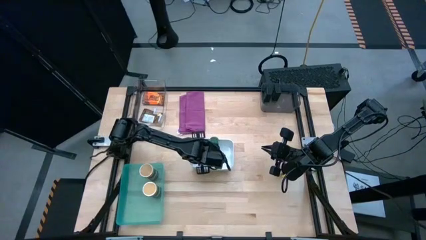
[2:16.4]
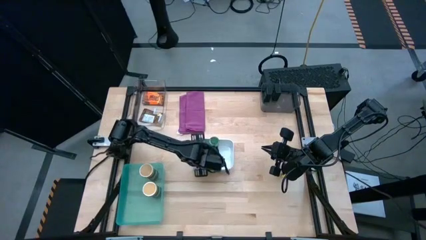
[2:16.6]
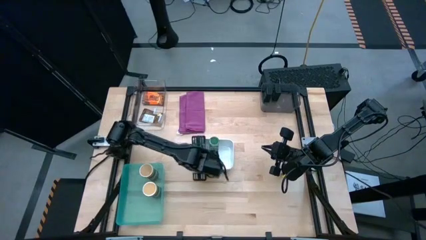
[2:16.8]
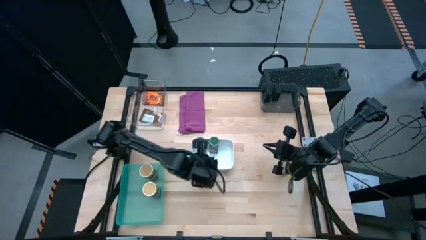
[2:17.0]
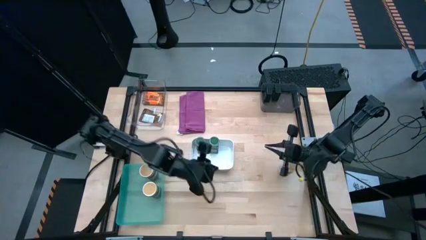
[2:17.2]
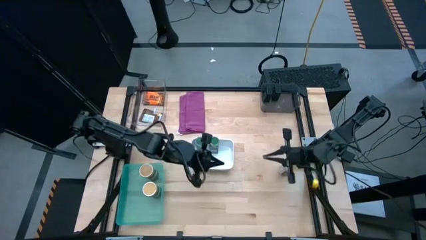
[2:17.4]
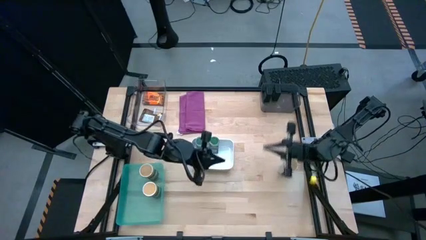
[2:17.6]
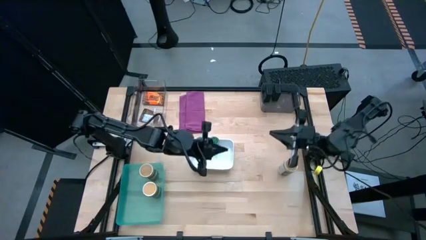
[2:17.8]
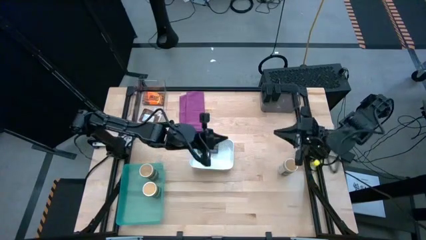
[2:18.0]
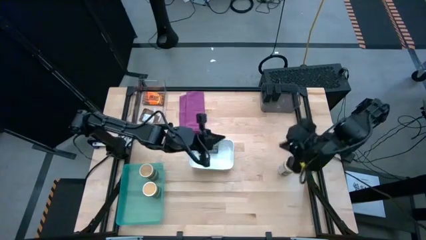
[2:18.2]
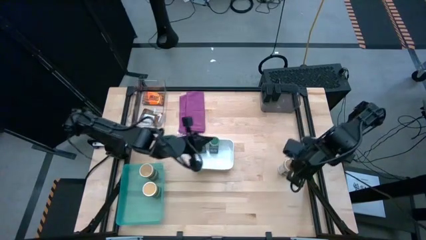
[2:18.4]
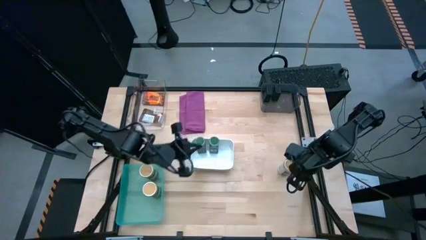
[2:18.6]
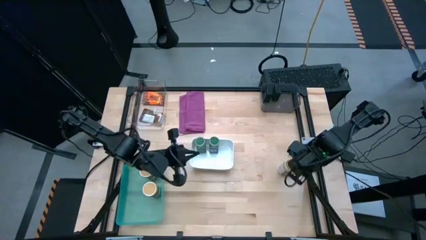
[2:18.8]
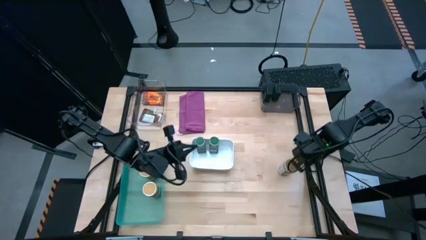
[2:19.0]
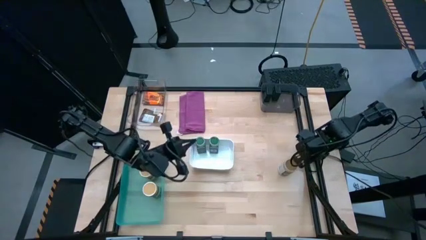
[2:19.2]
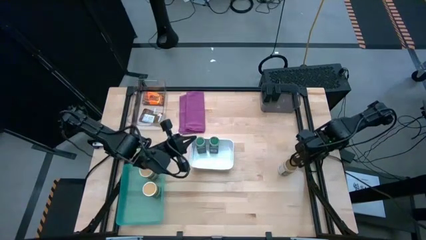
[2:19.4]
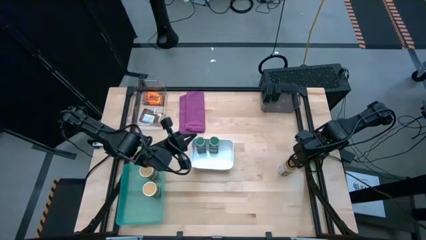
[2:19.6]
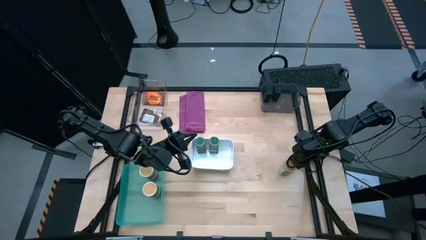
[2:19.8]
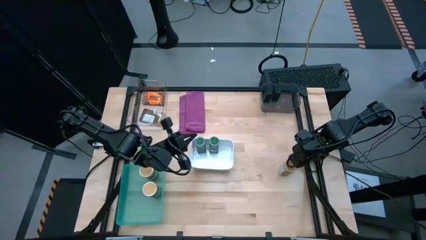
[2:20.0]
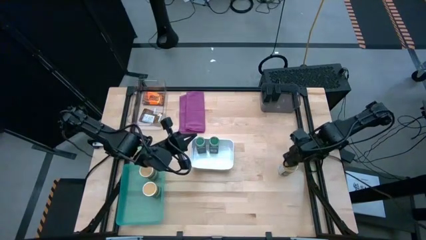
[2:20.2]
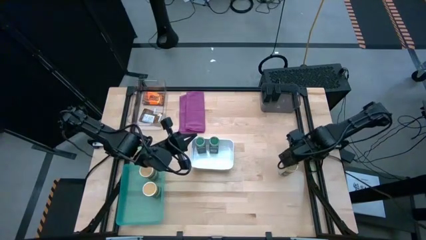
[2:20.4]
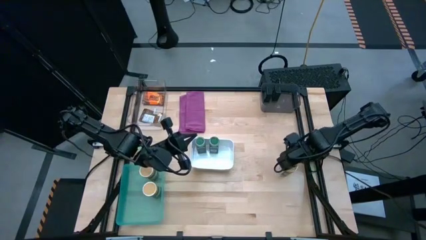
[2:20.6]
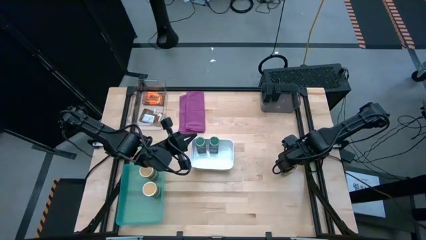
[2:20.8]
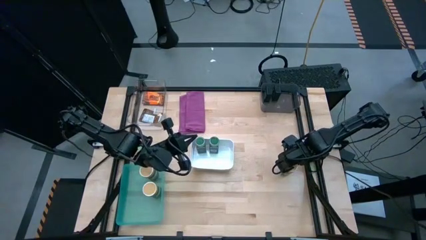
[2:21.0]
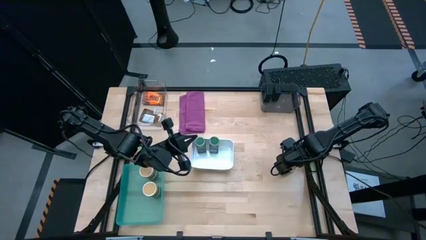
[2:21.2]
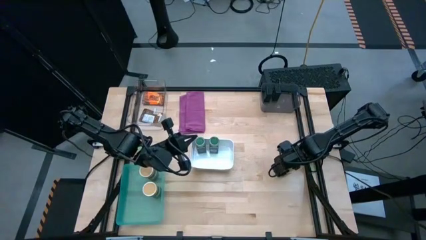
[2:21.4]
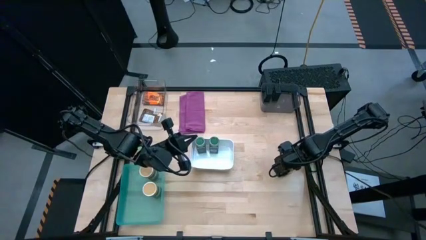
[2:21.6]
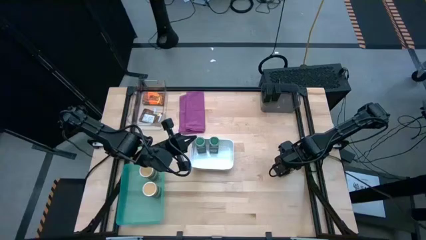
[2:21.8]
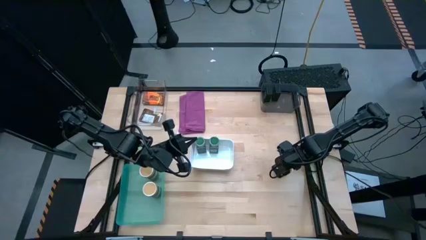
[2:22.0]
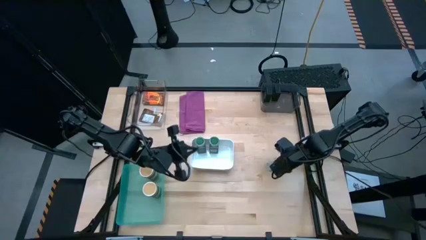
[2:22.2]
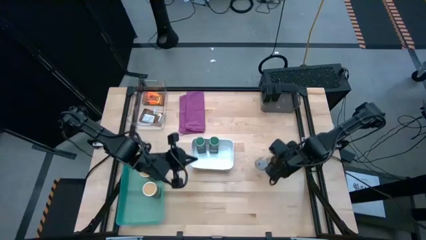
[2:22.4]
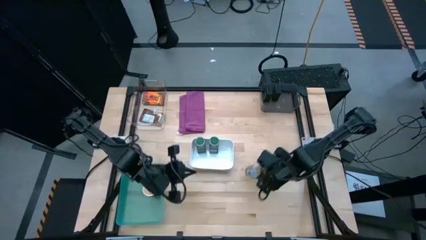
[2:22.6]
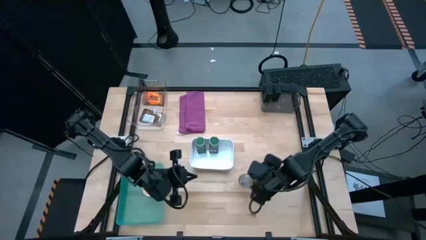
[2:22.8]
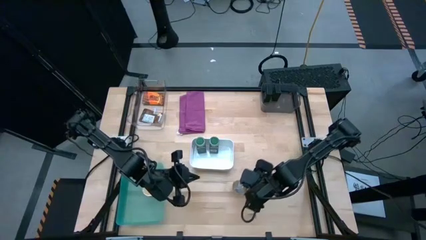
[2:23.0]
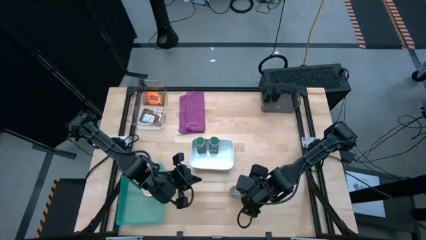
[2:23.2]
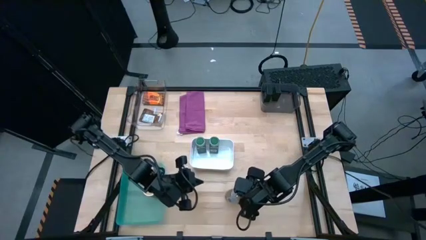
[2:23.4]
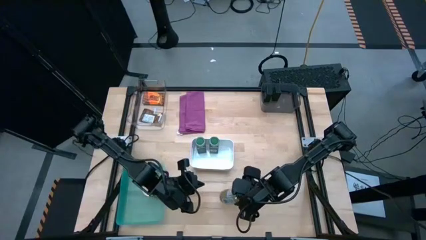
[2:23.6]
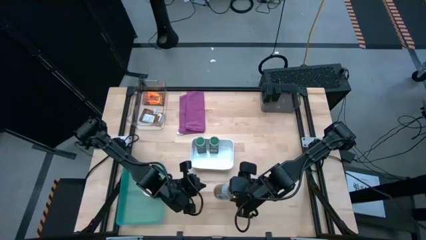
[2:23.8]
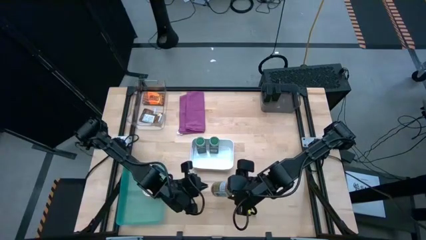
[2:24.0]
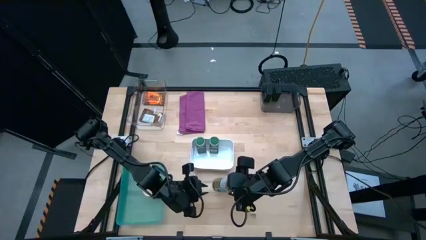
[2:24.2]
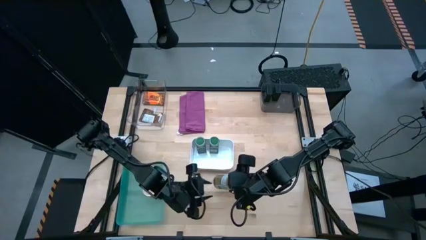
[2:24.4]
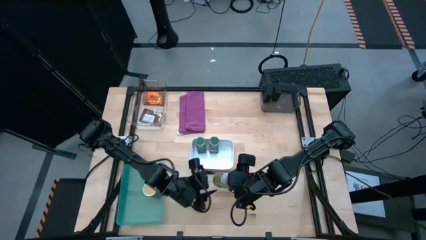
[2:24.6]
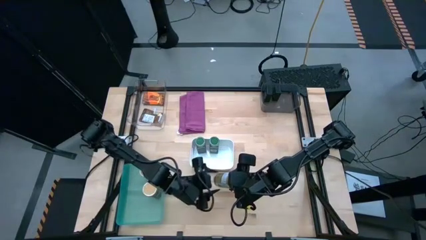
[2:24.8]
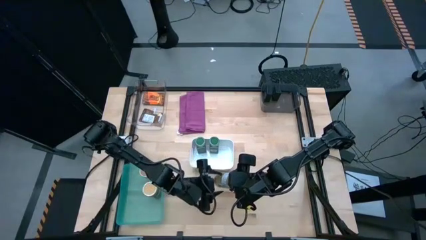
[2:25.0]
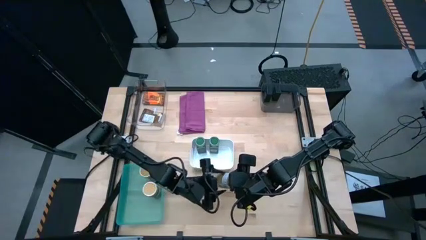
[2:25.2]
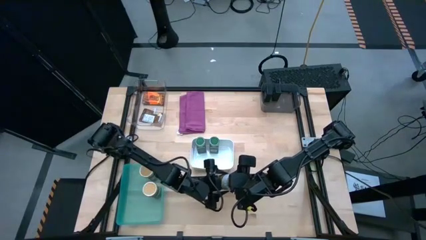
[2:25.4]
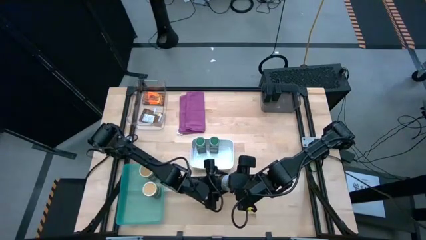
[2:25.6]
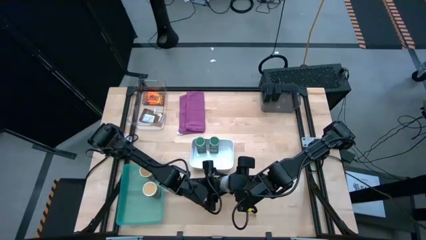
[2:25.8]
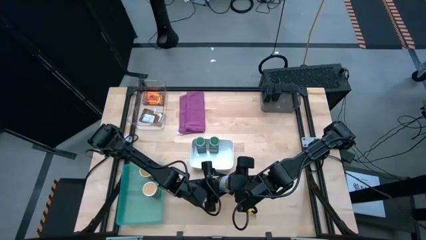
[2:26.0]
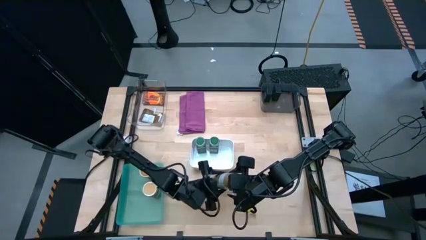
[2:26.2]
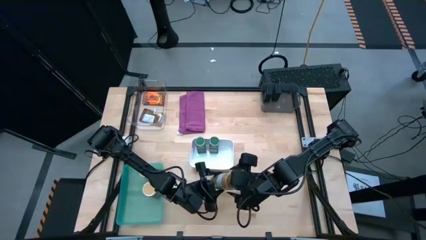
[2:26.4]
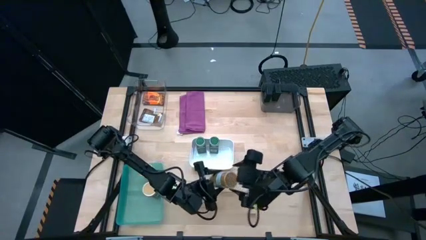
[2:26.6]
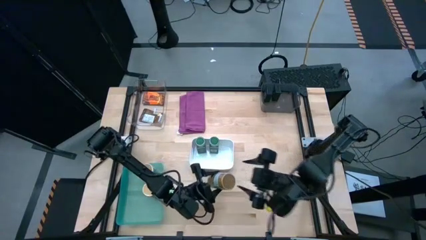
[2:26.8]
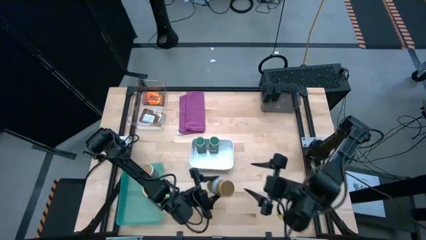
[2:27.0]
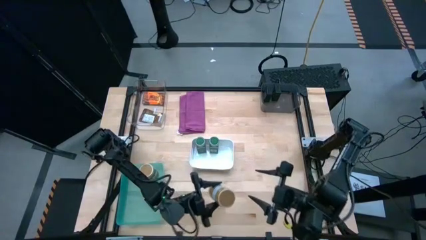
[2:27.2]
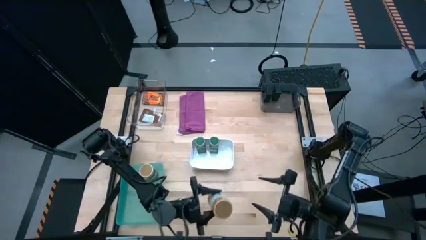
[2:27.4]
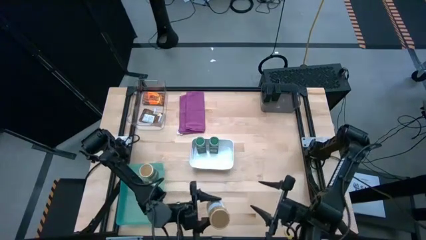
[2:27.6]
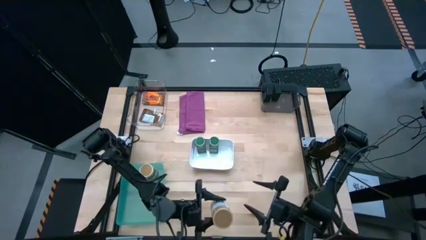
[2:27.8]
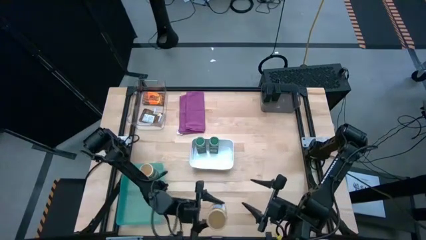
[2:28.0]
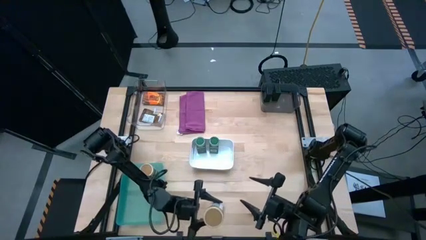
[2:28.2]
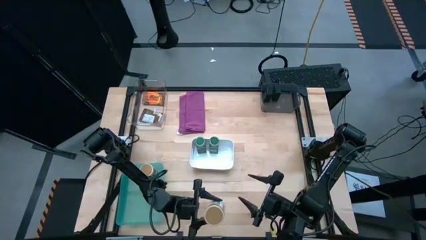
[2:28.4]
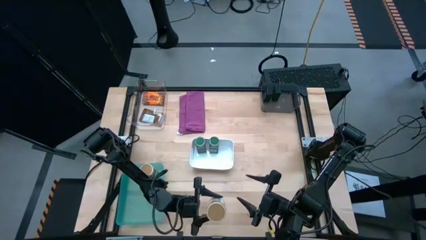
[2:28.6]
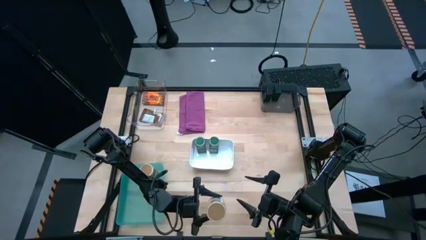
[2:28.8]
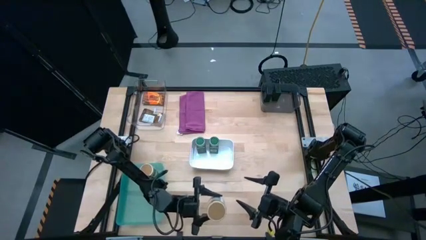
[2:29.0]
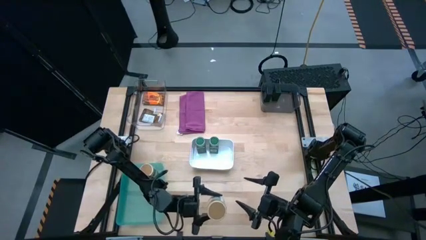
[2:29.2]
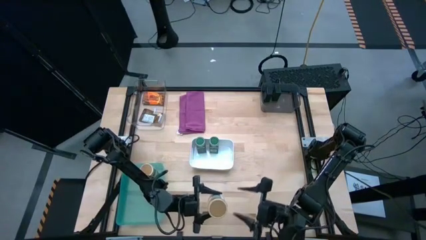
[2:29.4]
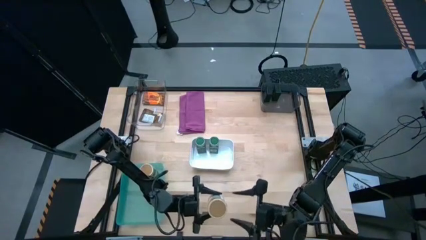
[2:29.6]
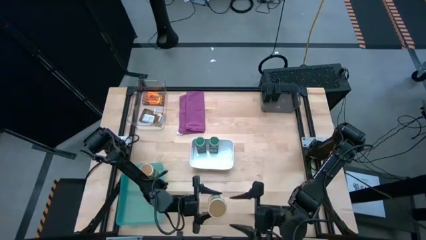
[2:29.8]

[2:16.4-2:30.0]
Task: Sort spices by type
Put the brown seasoning bottle into the blue bin
